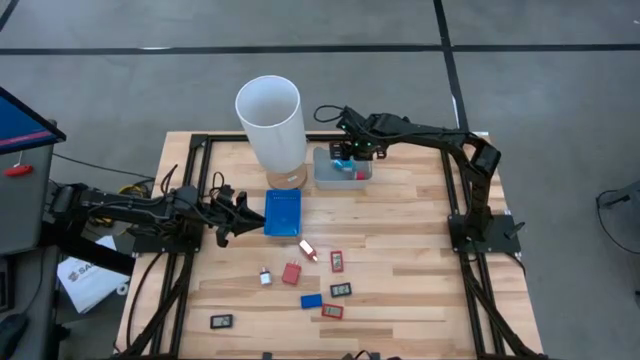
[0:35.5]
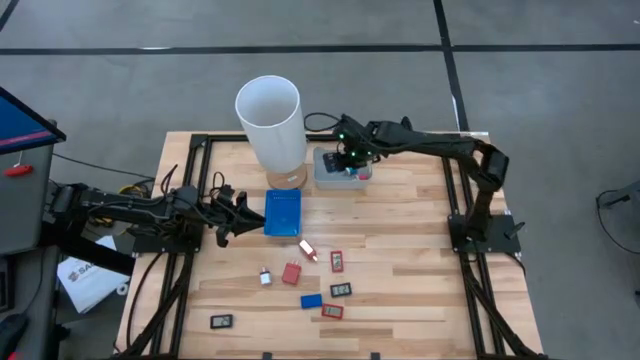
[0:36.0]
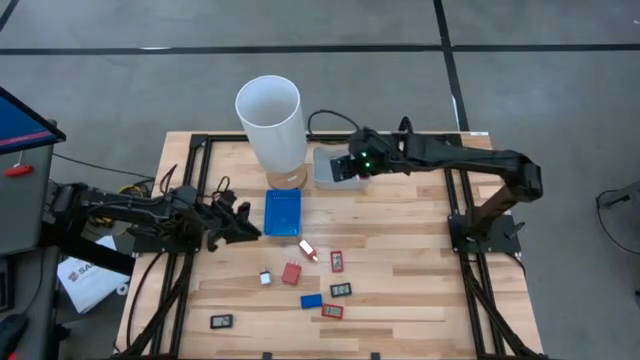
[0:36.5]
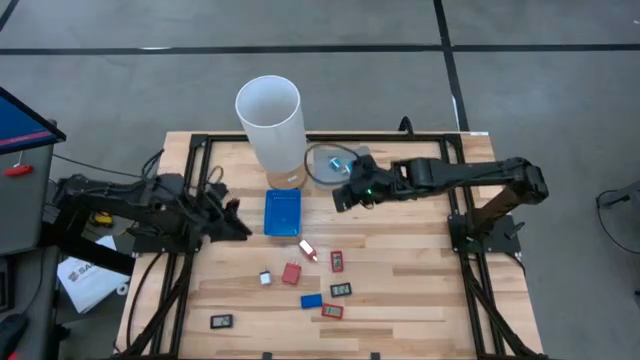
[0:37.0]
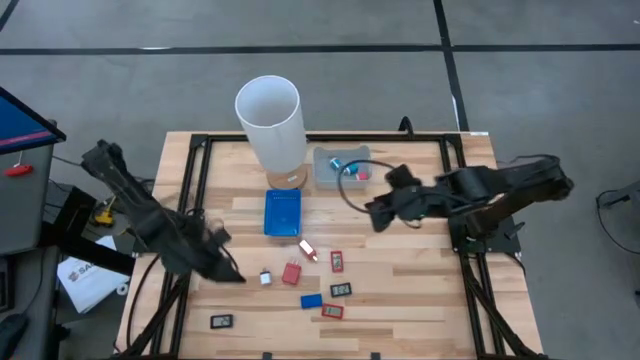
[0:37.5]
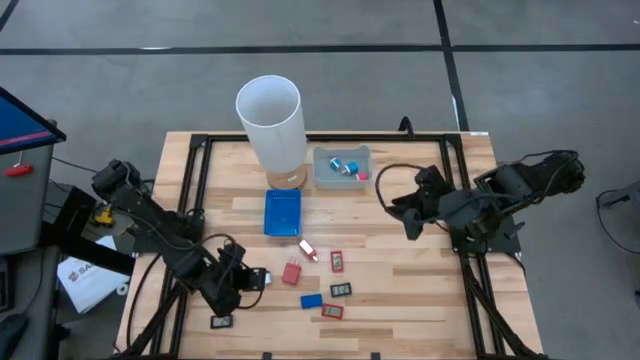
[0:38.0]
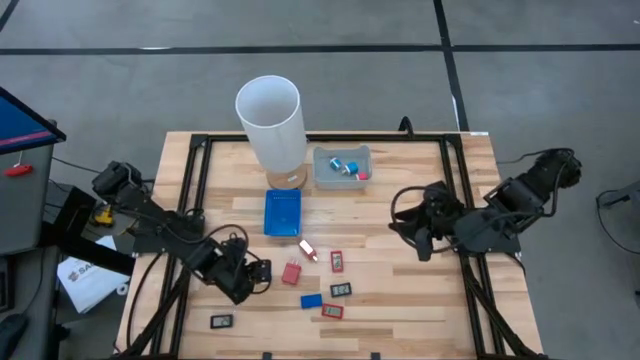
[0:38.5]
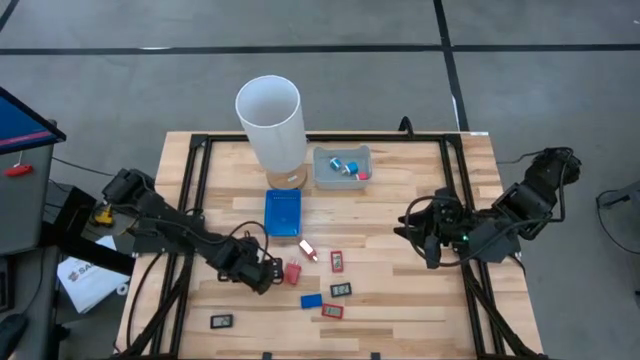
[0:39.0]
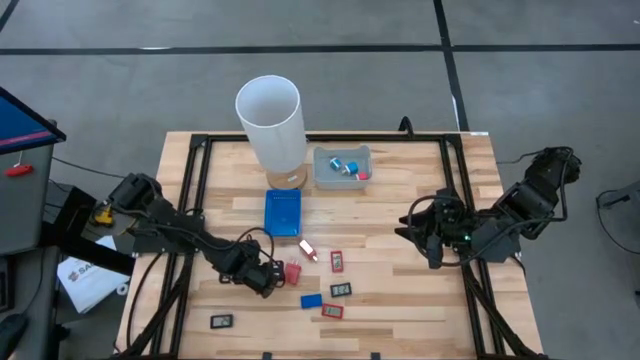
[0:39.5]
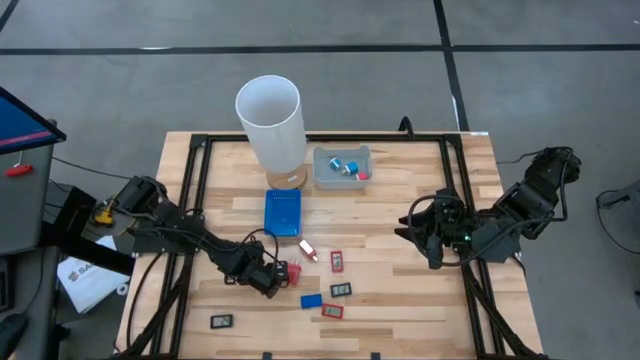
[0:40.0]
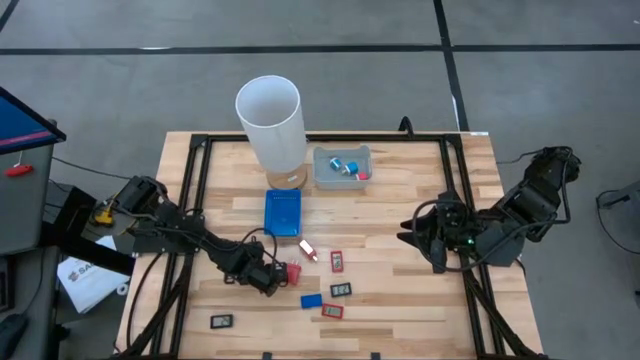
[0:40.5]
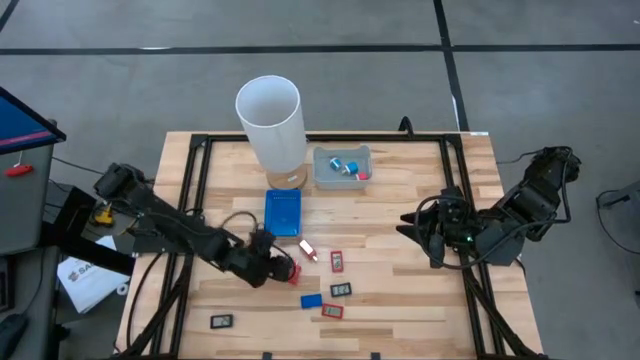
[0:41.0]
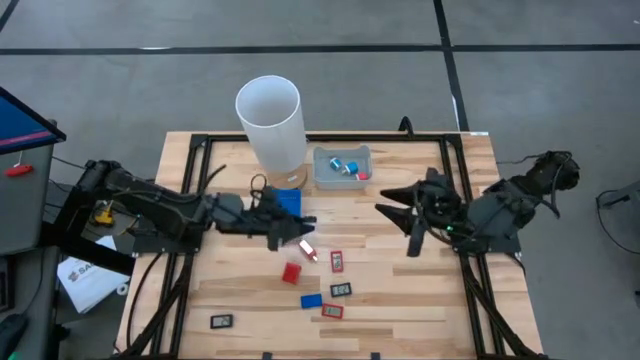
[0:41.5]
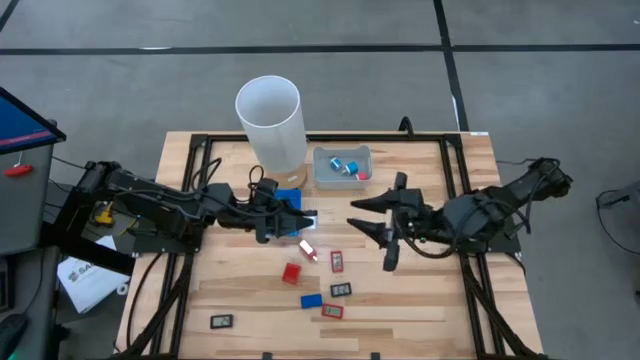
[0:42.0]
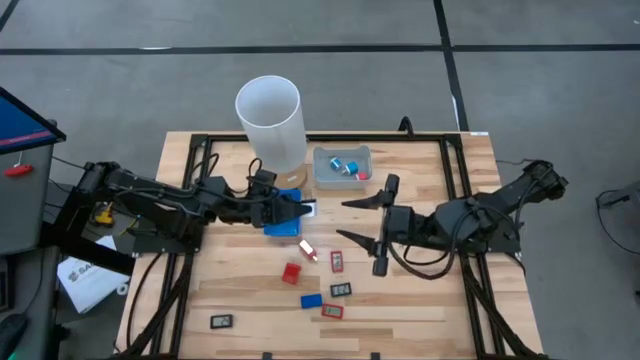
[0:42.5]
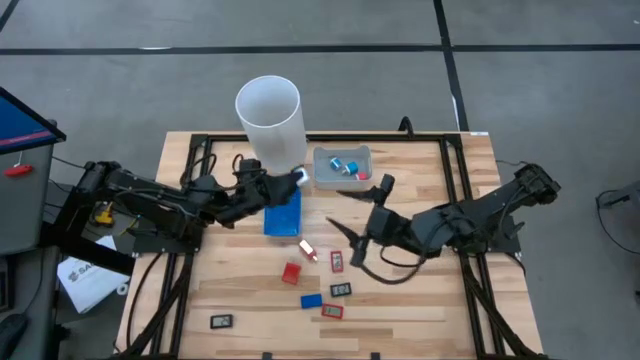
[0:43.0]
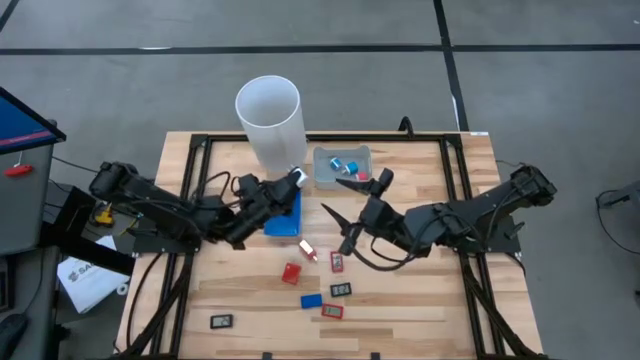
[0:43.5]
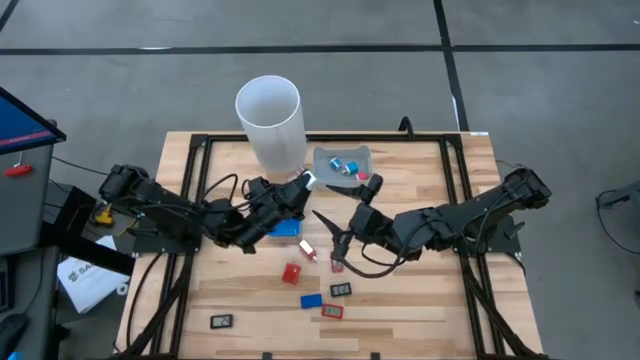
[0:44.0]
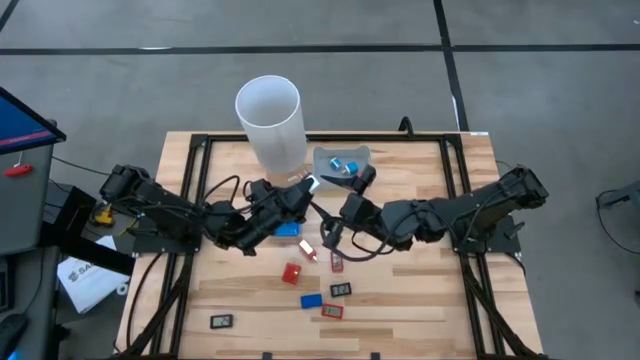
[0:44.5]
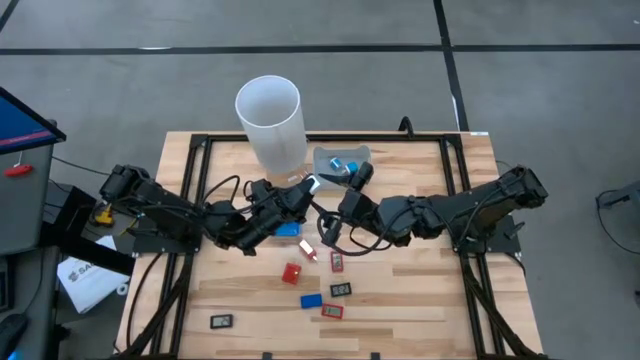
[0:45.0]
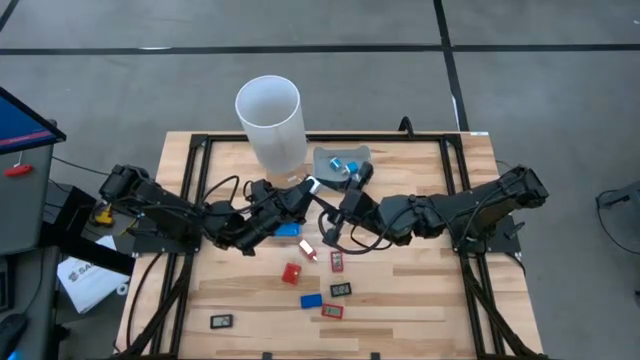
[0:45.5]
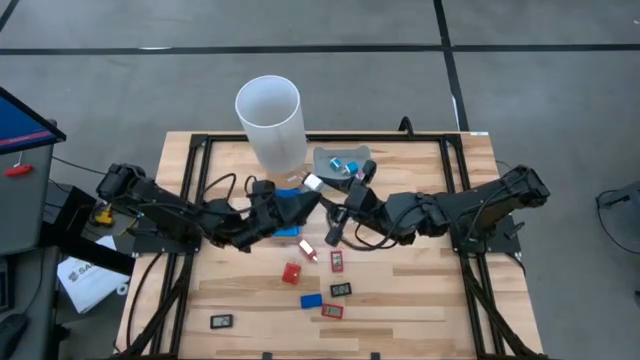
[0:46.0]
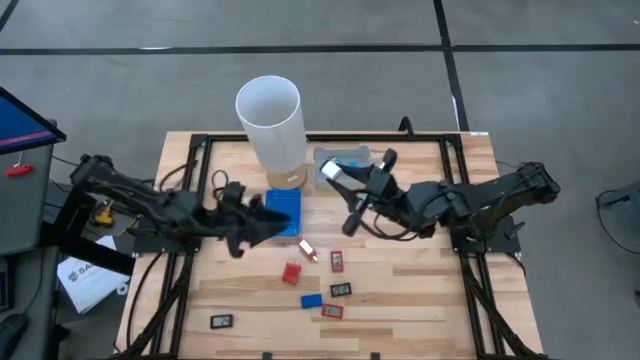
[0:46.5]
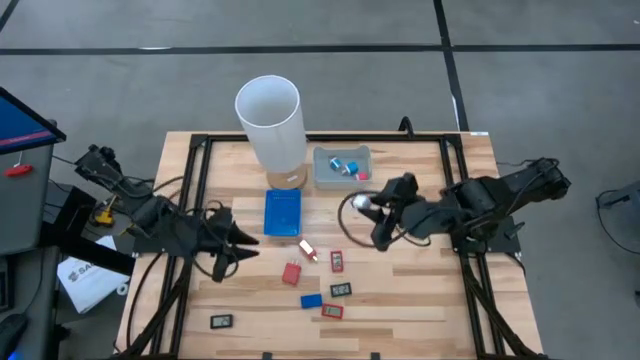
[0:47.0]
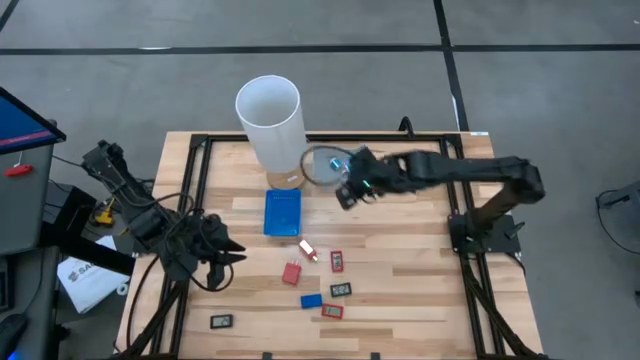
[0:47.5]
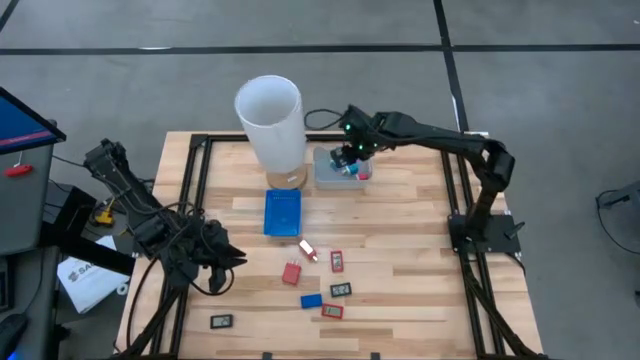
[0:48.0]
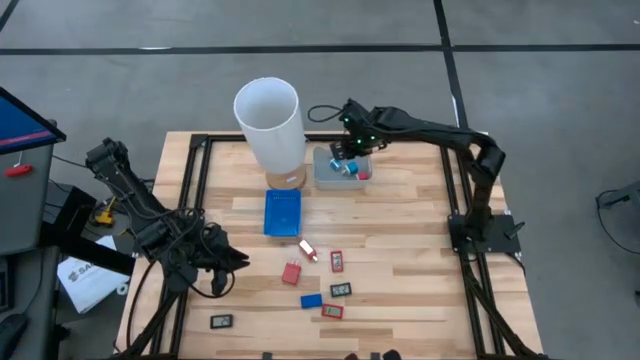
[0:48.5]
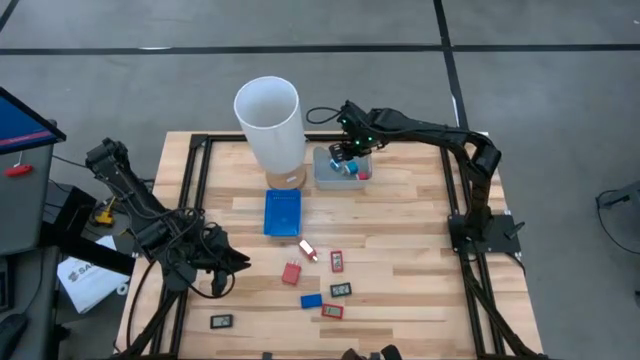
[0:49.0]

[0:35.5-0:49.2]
Task: Pick & Place Office items
Put the white charger adapter into the gray bin
